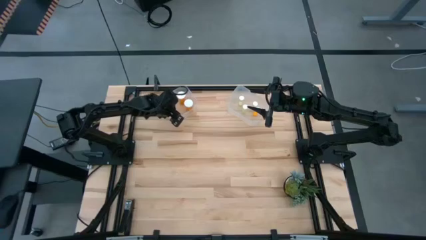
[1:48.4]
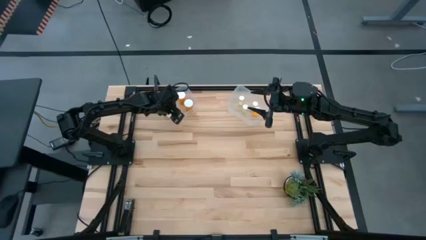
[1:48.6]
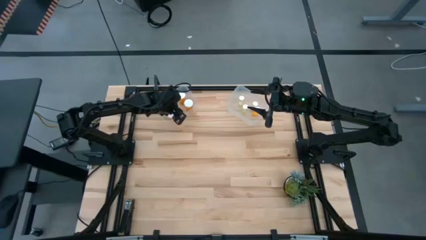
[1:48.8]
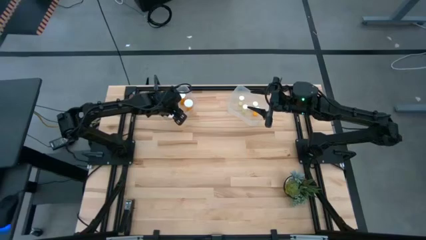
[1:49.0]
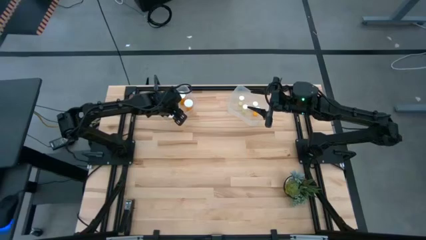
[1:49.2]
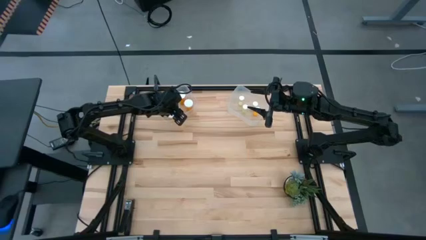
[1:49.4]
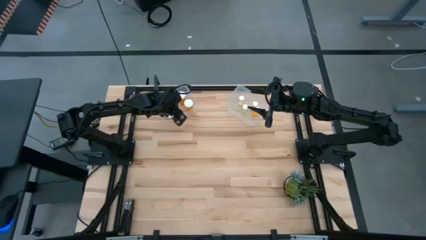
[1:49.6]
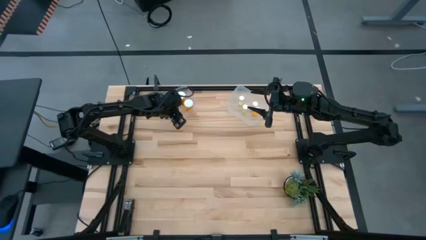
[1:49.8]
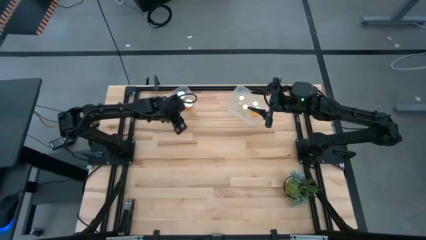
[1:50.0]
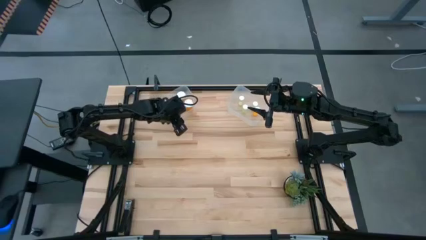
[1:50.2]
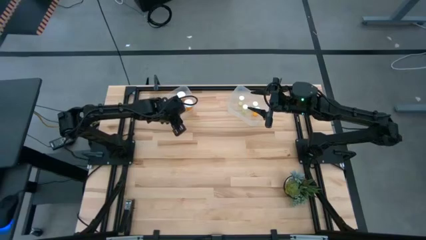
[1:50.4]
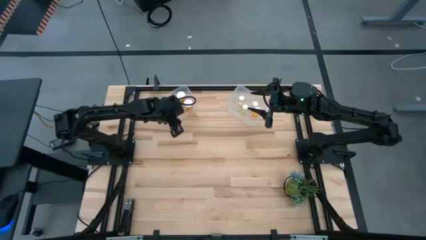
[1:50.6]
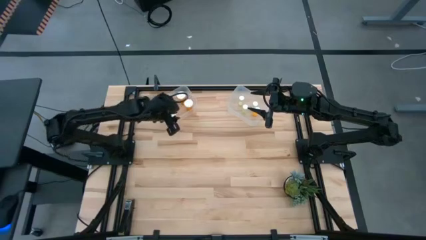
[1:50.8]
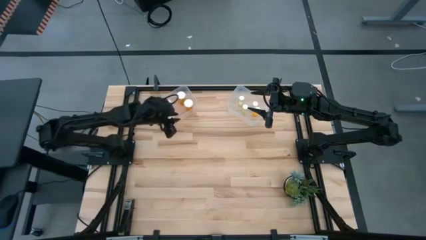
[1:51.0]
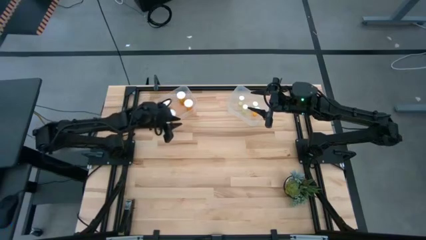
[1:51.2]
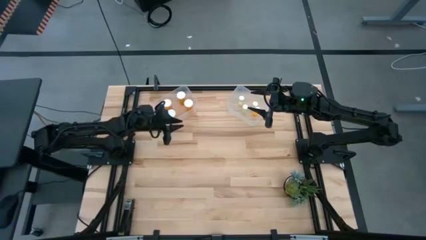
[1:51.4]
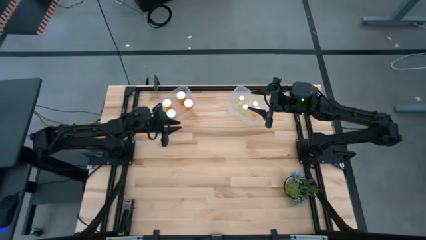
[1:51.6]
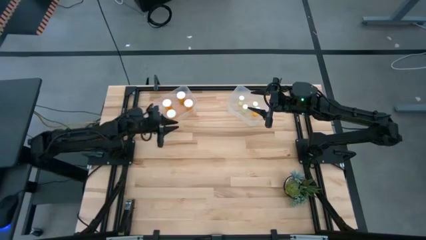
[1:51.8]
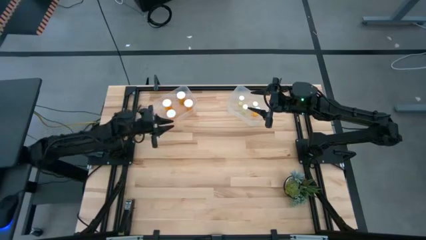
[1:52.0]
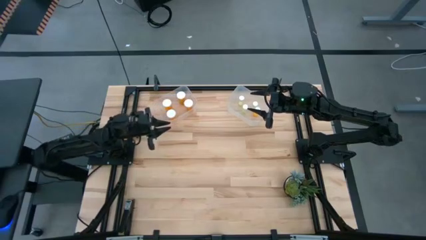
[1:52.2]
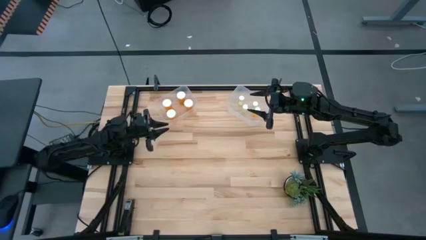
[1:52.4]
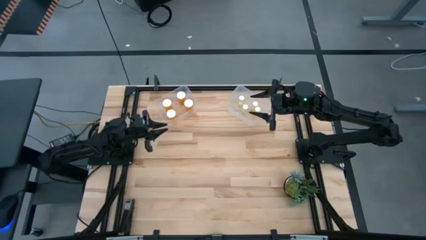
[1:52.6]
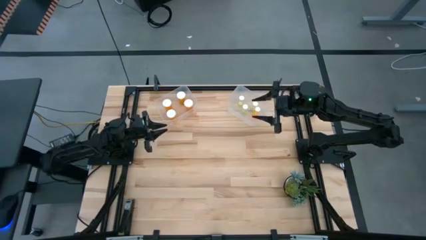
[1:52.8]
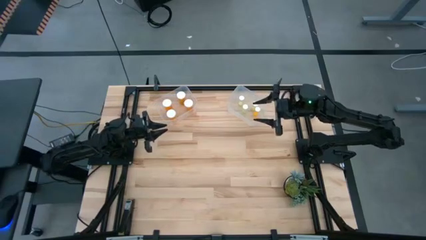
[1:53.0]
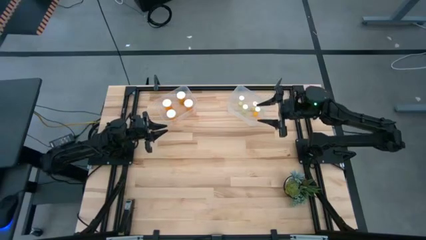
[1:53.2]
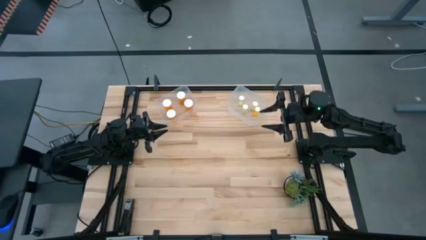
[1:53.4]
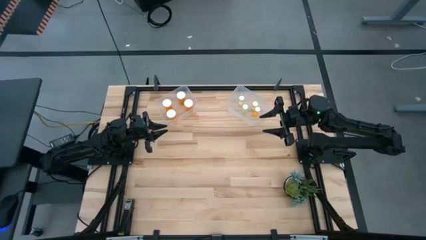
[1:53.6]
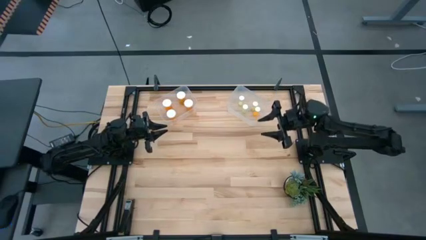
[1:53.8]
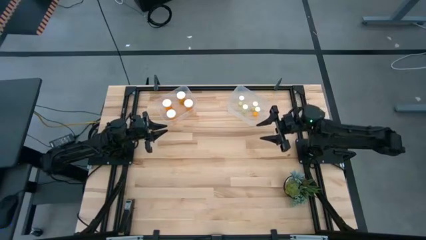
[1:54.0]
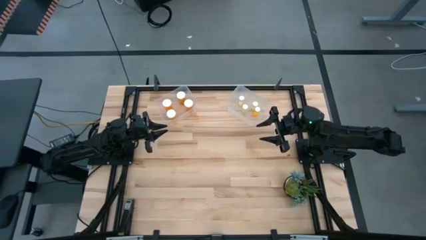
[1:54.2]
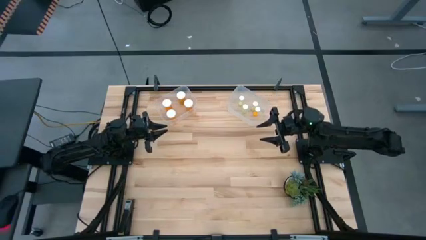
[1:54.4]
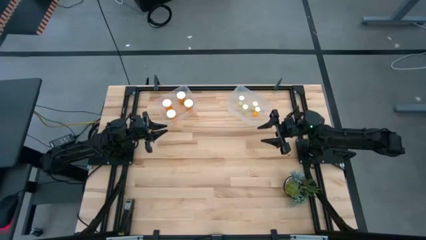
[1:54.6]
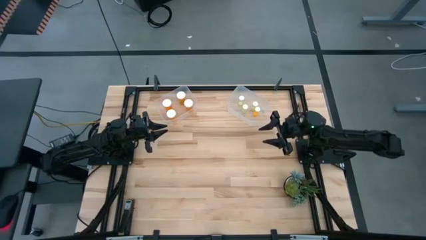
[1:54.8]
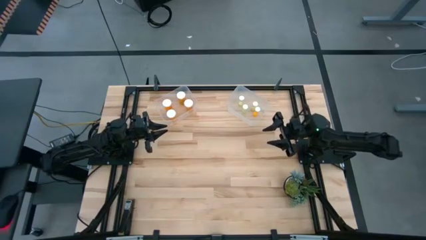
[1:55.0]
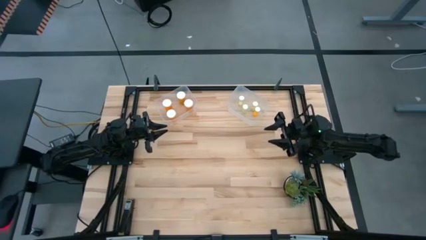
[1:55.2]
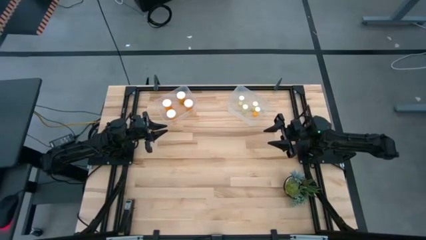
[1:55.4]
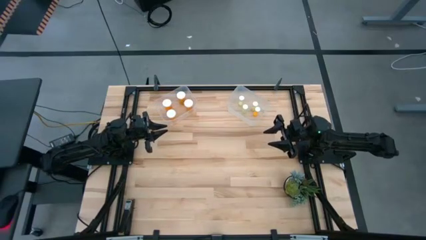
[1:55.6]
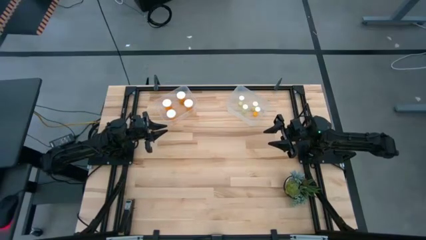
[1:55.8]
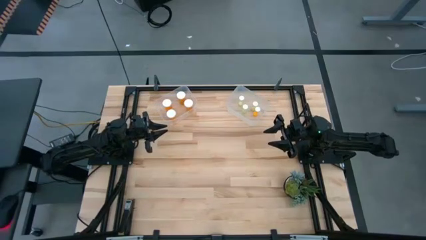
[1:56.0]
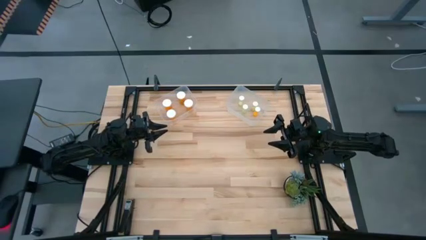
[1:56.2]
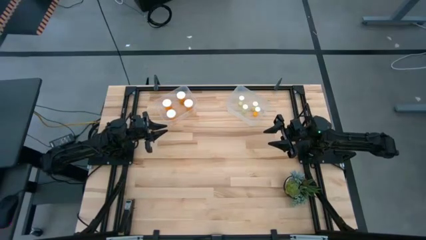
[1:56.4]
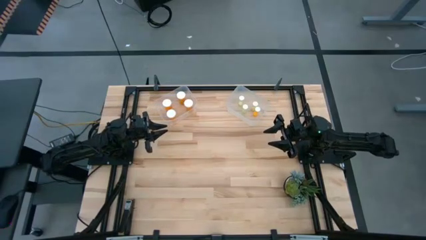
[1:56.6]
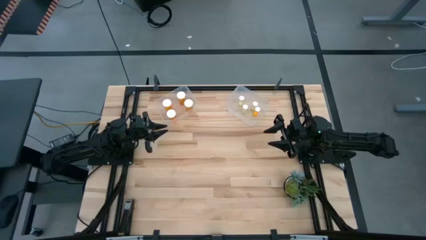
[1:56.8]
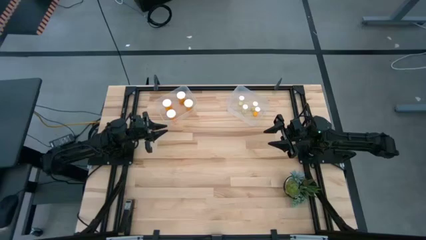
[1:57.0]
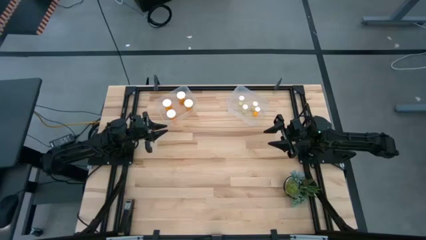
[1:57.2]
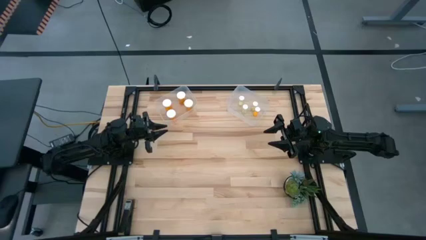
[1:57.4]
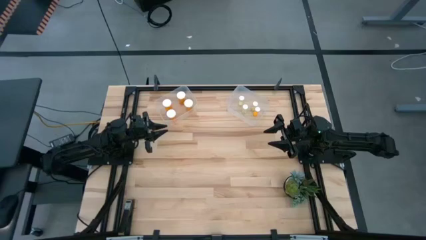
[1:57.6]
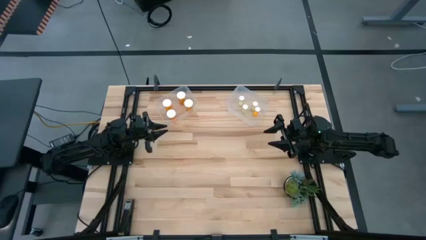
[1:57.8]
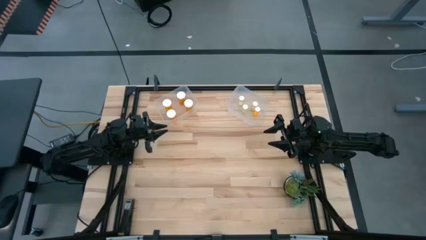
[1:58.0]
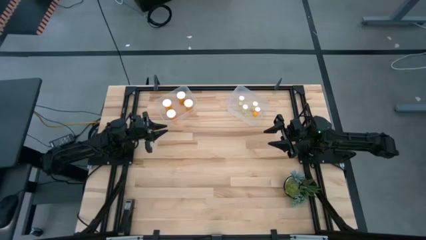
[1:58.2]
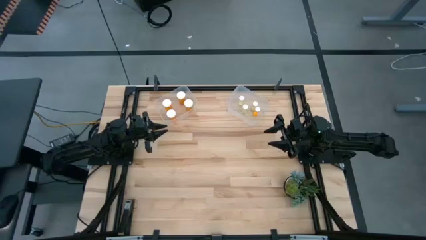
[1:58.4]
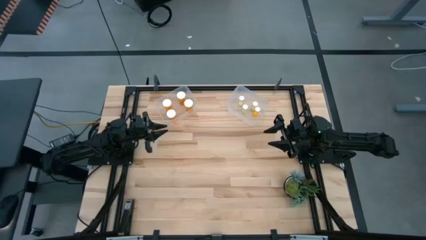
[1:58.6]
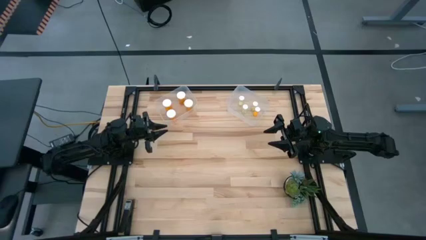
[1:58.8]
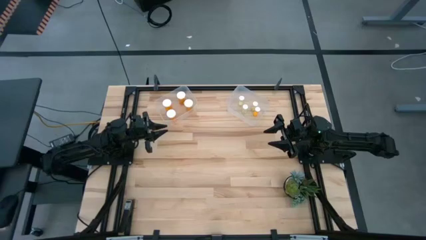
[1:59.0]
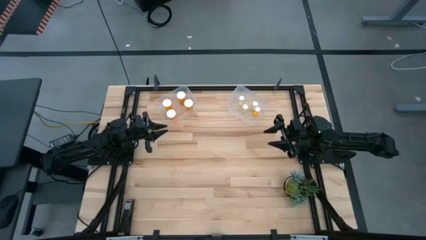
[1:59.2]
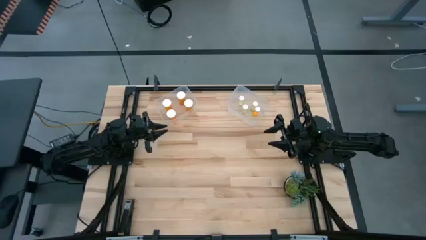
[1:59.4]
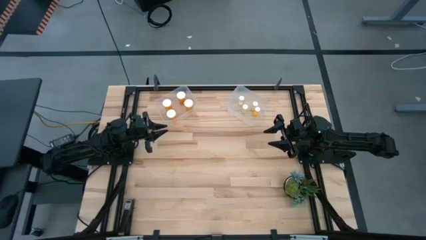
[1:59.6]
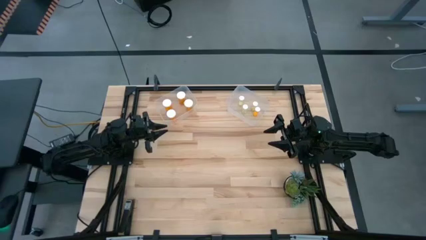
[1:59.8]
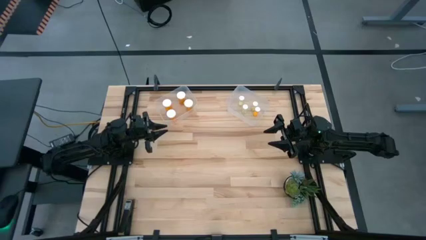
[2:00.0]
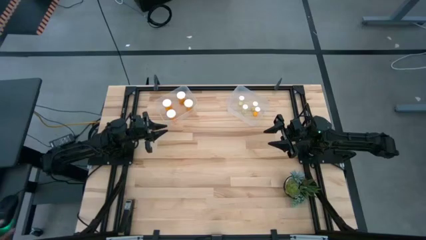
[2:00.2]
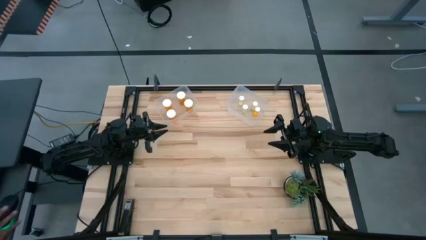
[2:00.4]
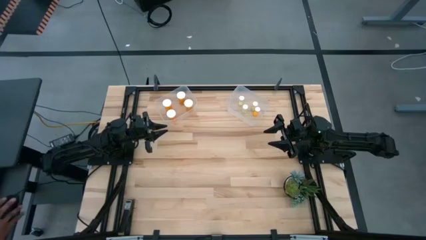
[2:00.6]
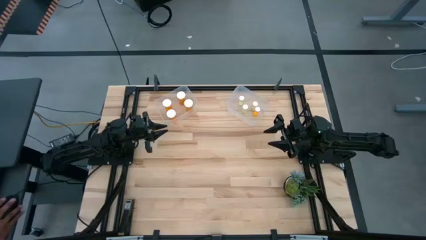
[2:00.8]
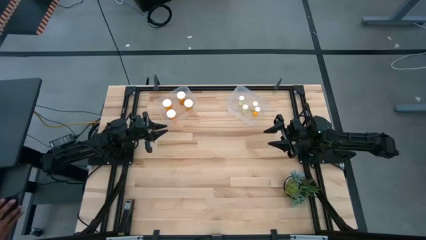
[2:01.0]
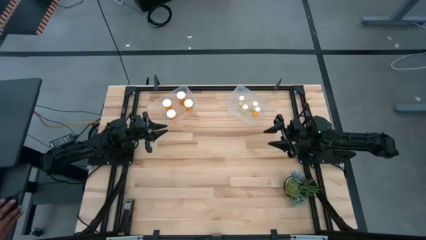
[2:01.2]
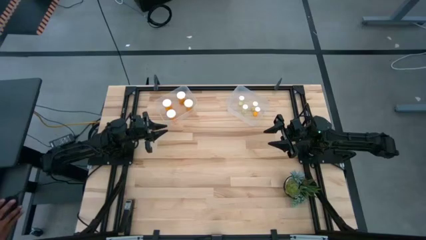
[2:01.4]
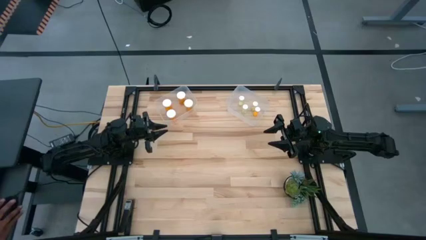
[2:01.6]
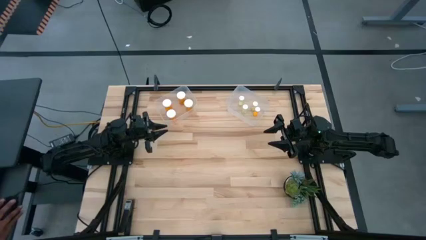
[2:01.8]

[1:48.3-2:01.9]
Task: Pick and place medicine bottles into bin by pill shape (circle, oval)
Return to Home Position
